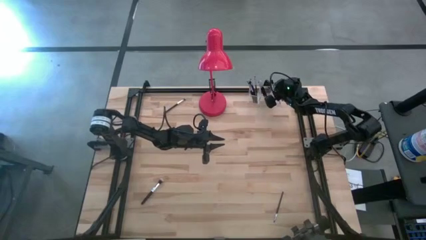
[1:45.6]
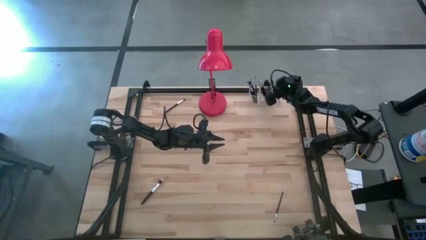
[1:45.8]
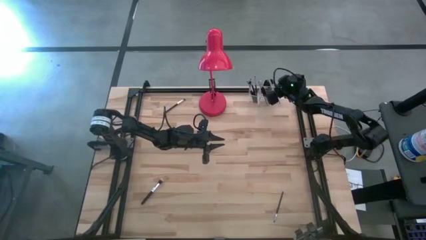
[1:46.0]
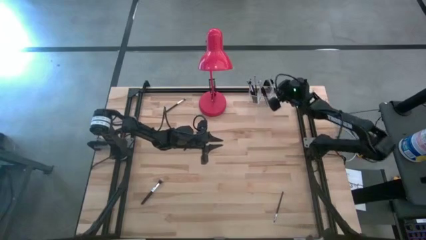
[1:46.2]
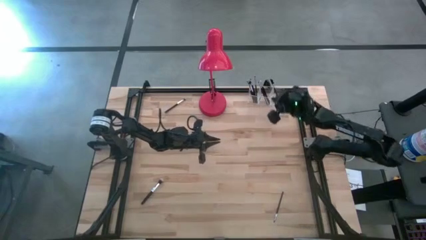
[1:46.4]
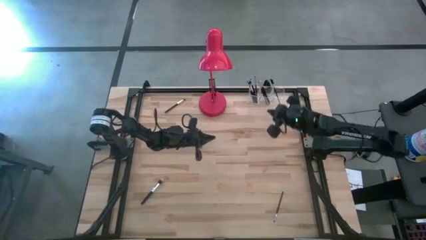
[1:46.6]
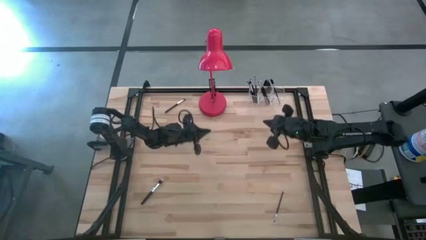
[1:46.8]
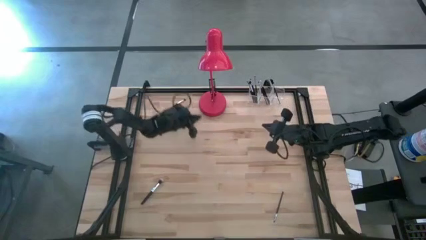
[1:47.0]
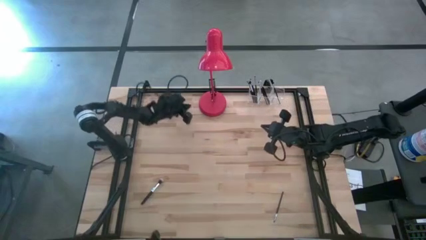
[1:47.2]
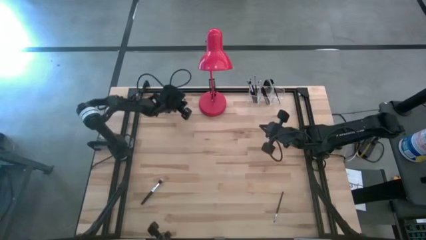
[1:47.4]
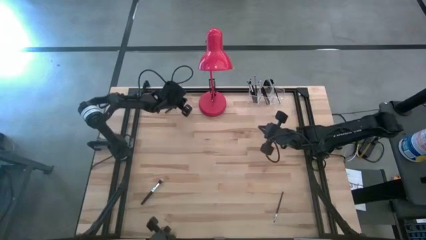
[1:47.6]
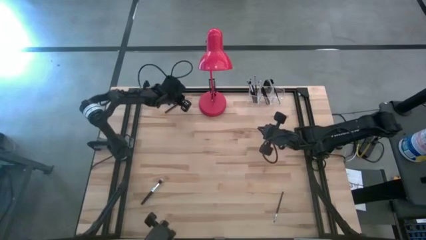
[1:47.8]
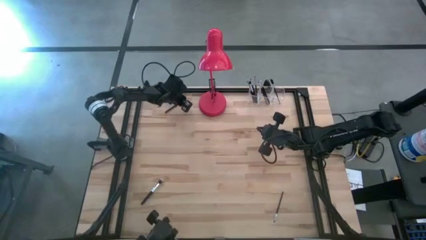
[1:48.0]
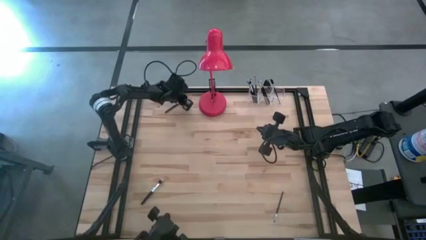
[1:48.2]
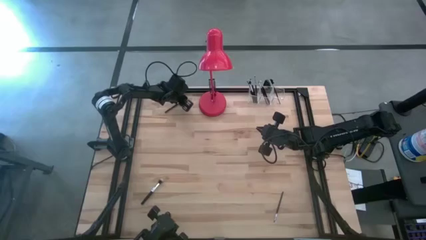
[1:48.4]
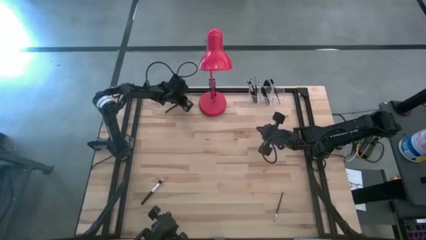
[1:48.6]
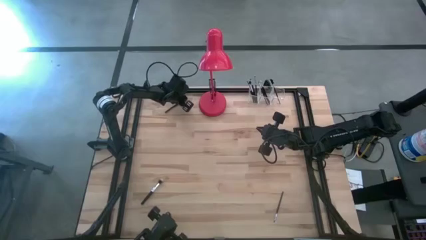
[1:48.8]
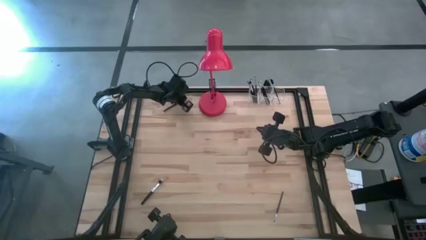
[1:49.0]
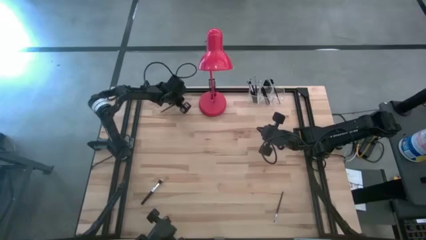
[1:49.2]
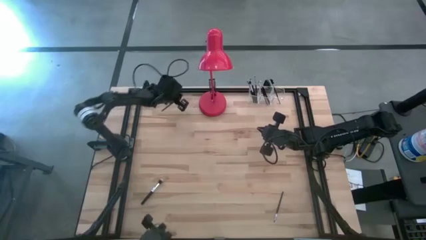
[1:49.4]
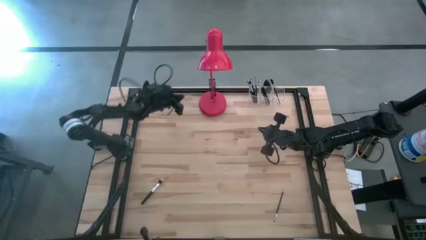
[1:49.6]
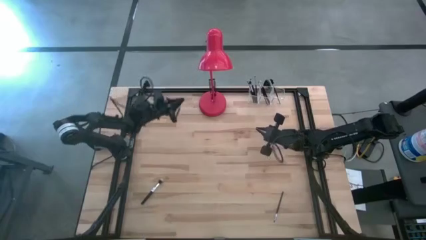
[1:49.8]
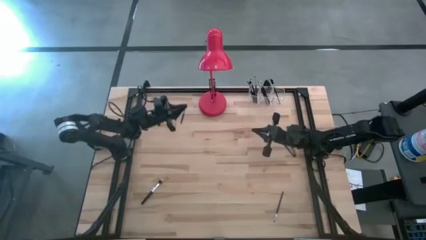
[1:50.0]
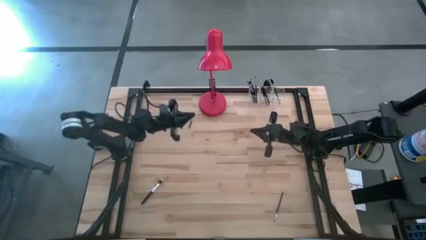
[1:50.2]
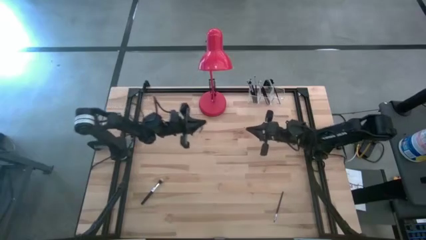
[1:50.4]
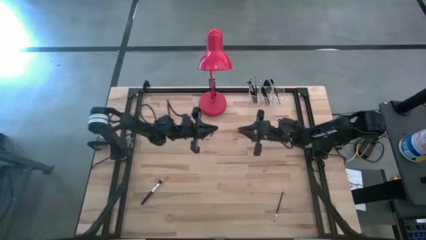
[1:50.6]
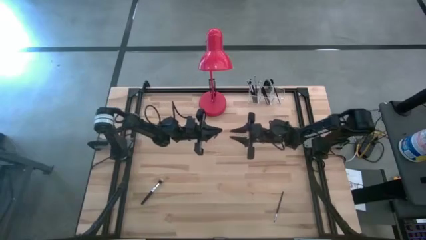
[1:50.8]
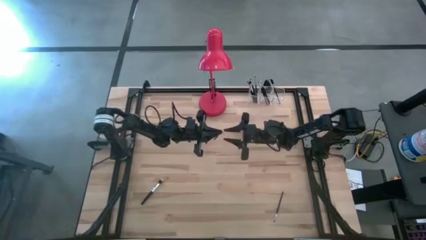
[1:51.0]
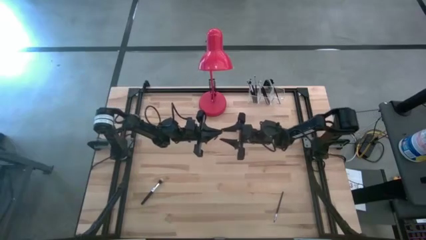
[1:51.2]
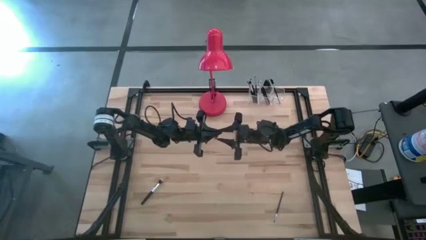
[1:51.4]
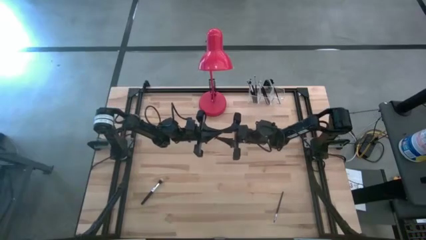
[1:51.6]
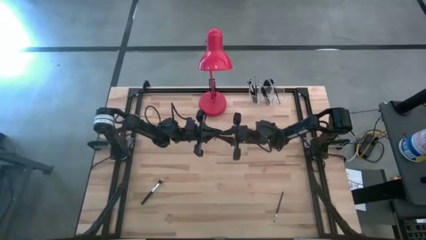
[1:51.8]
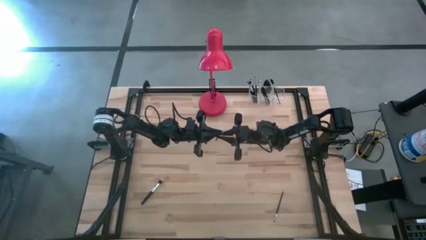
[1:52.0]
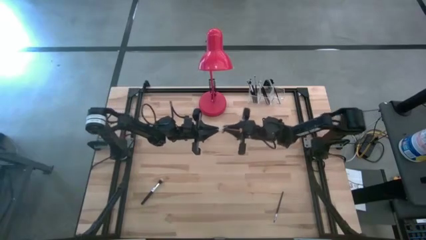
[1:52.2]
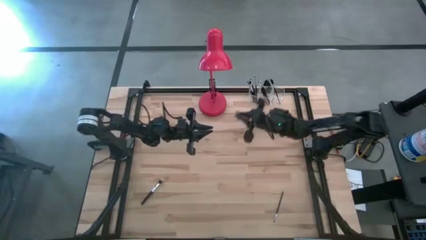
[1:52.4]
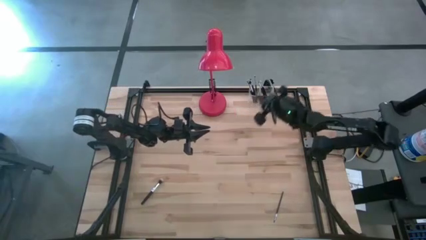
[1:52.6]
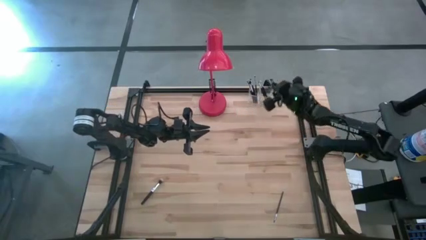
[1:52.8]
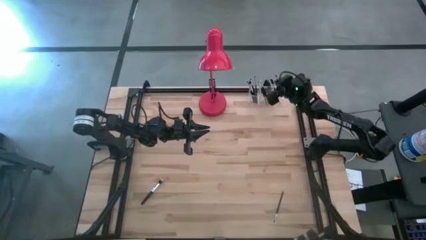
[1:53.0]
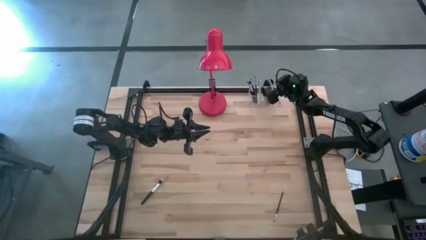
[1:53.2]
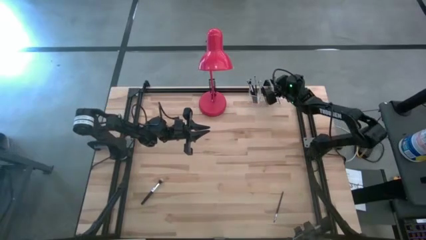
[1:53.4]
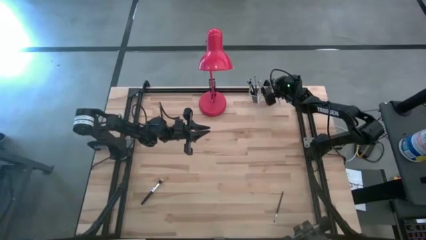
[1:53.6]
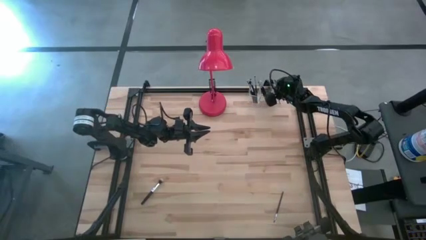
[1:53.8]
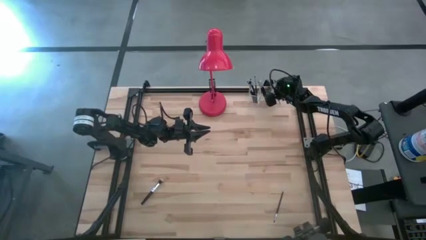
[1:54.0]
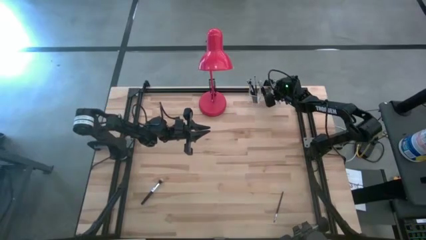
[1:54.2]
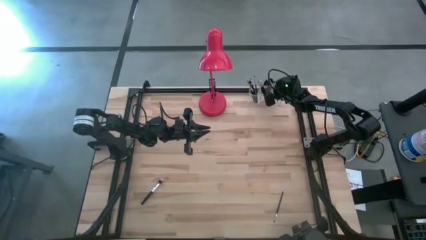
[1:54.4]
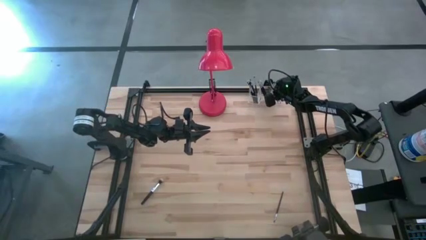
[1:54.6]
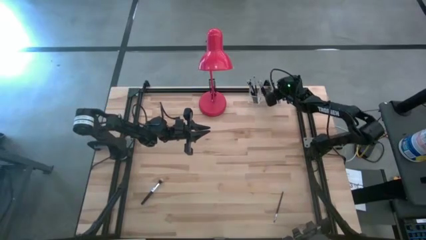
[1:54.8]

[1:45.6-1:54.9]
Task: Sort items
Put the black foundation brush into the transparent organizer

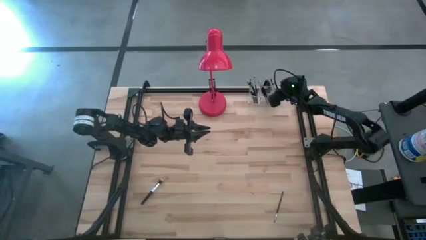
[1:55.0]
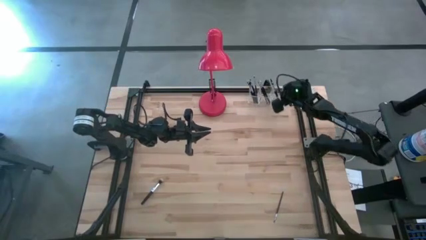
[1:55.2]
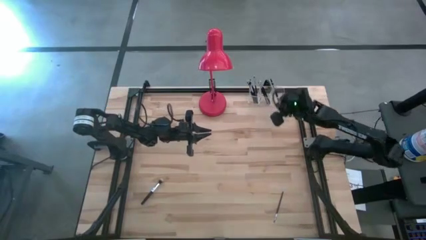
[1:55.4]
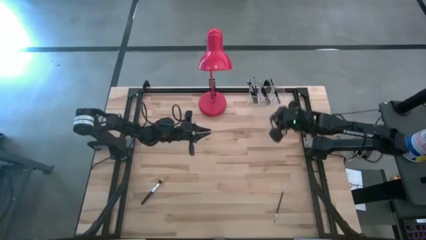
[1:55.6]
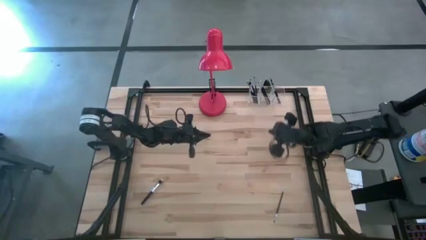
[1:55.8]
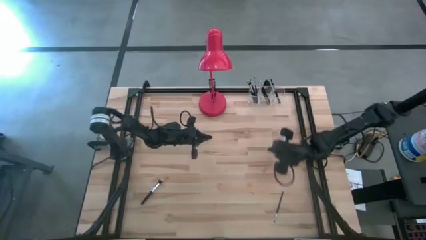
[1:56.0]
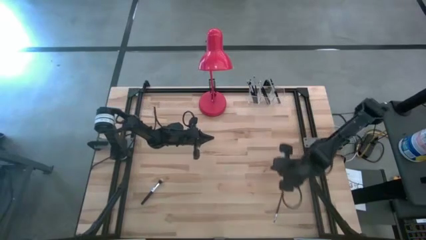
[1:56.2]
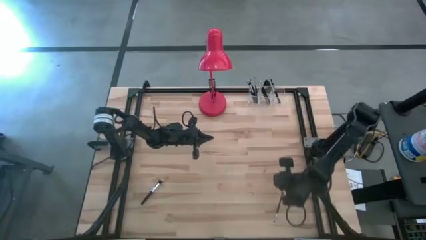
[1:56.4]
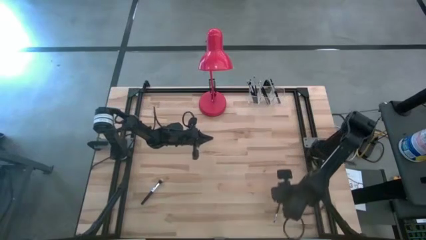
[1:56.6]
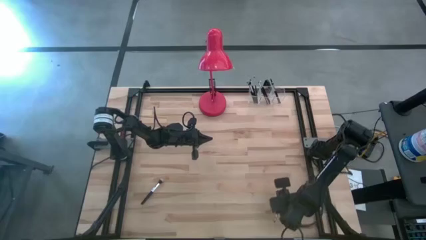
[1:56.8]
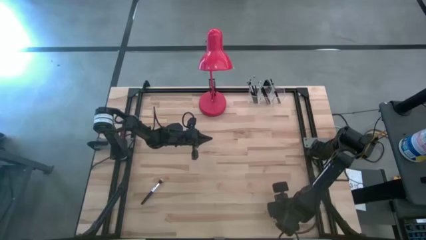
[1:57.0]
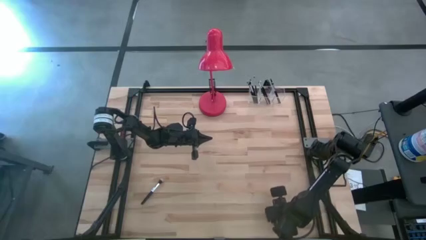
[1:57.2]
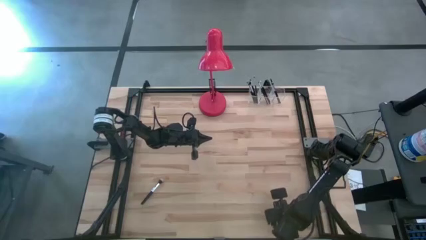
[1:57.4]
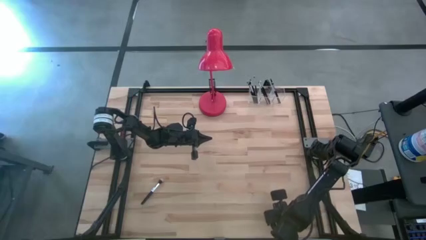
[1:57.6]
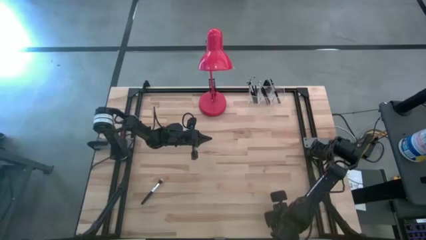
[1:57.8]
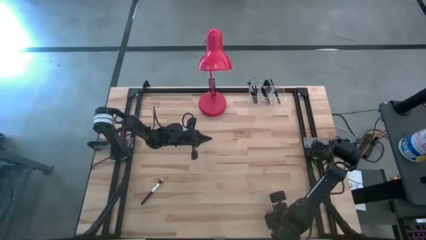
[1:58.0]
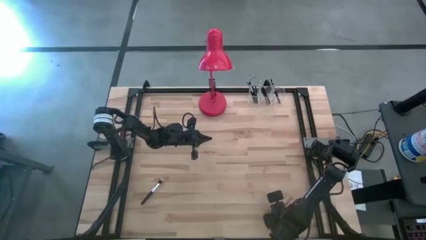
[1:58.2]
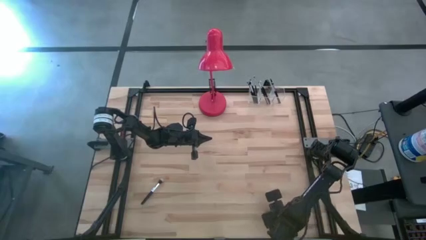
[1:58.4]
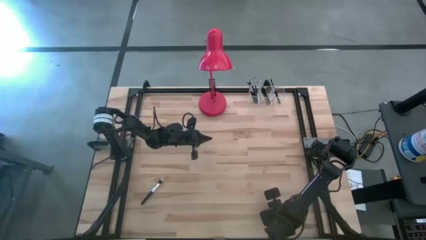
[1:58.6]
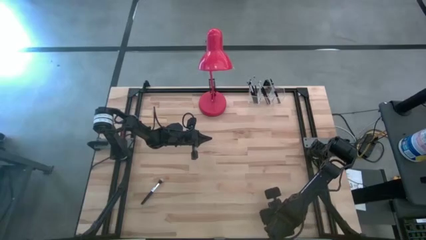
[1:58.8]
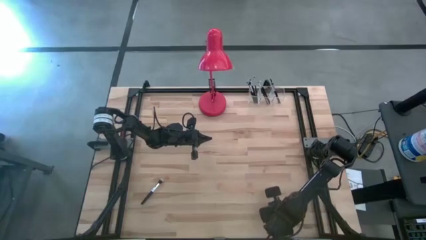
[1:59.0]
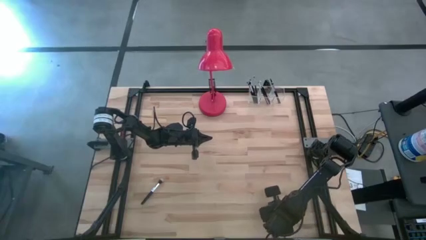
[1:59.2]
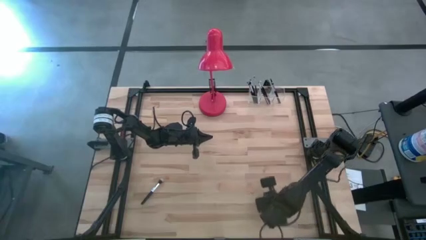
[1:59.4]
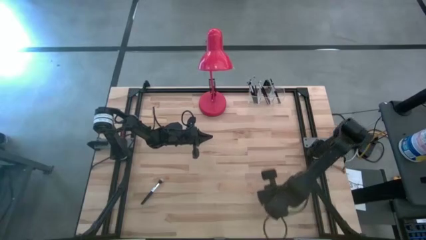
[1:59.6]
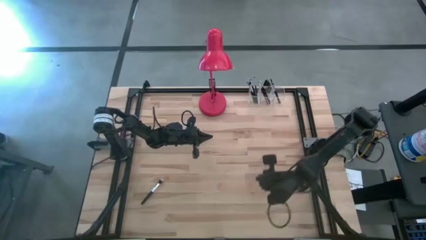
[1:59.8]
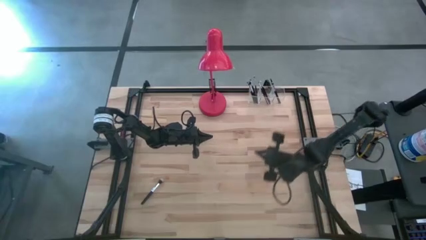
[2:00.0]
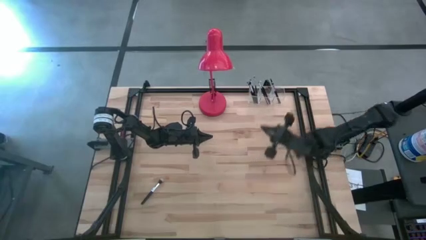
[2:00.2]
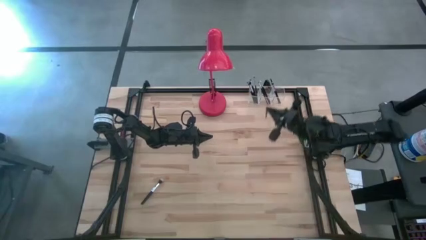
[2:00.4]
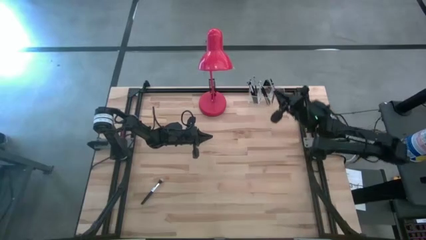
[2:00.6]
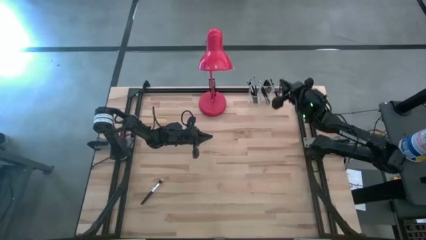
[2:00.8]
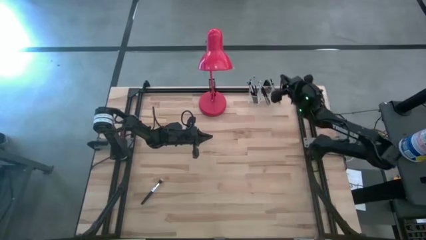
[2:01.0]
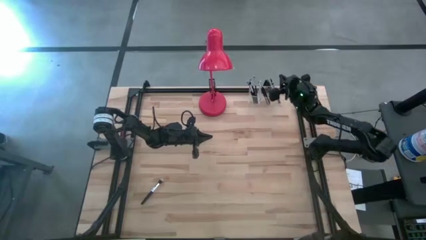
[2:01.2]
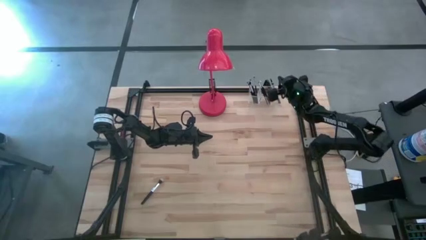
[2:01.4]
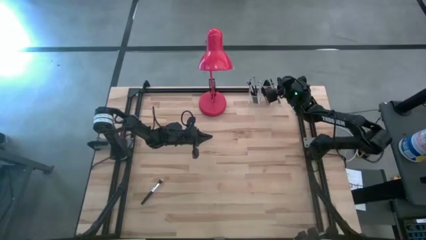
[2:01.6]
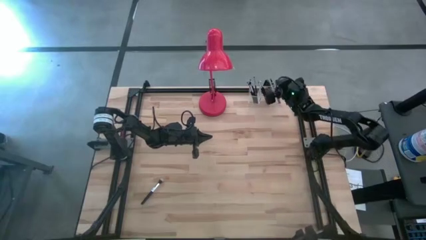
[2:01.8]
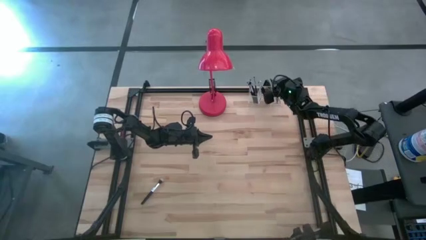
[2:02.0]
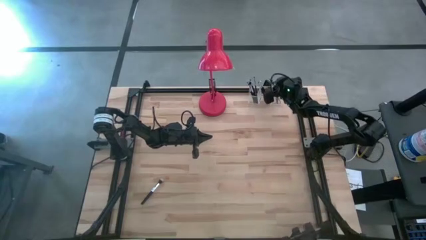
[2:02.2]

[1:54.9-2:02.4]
Put the black eyeshadow brush into the transparent organizer
